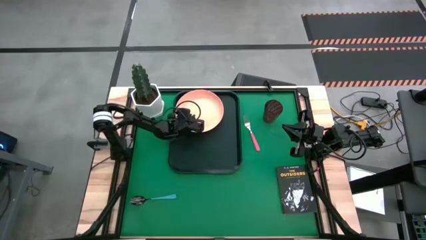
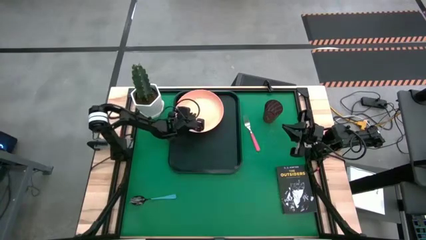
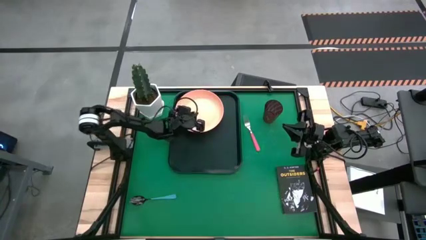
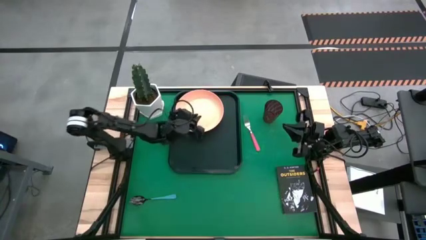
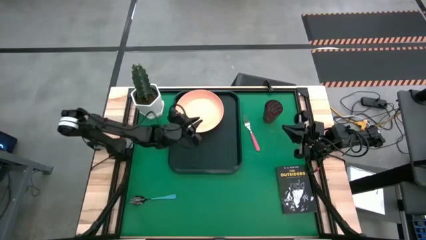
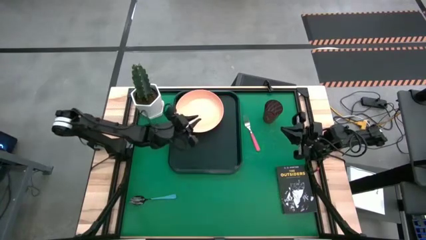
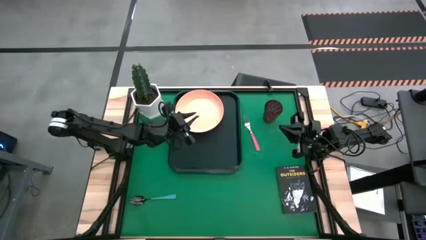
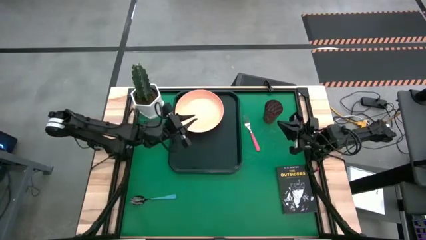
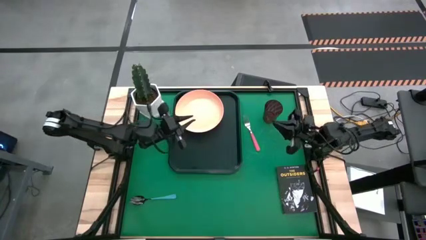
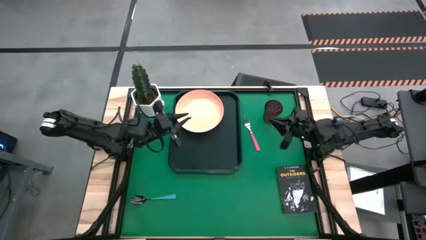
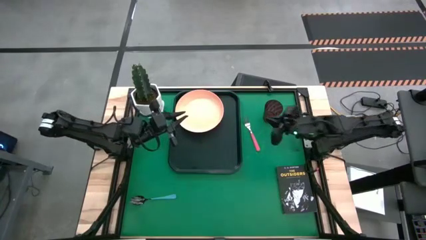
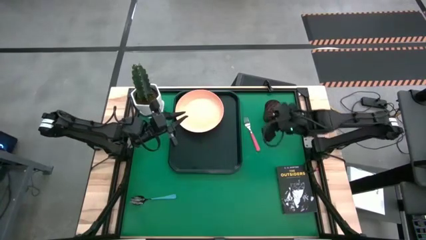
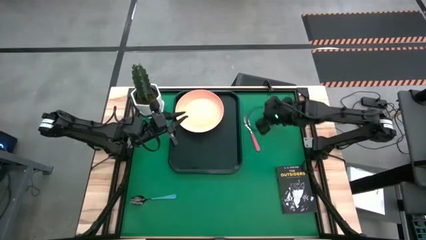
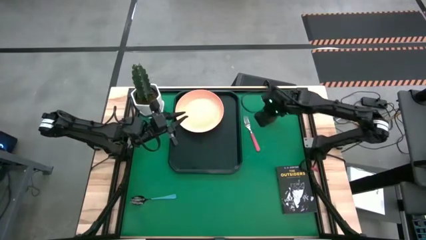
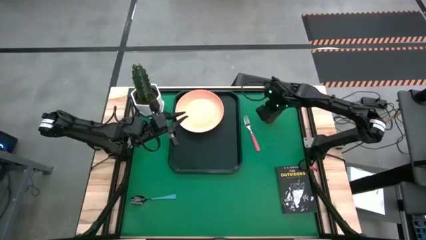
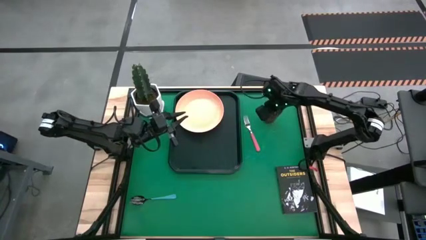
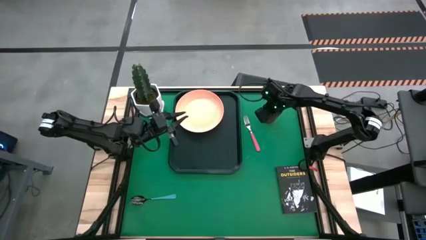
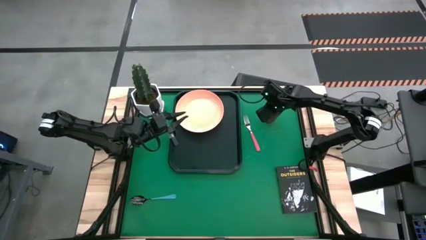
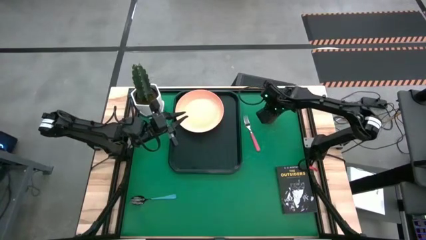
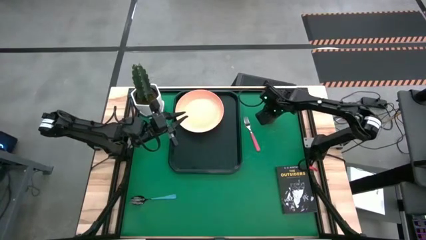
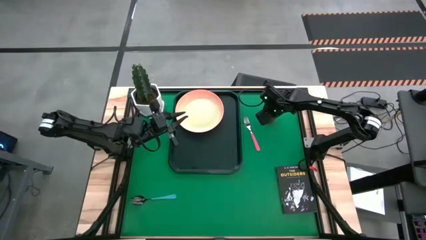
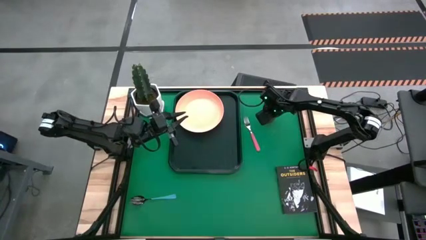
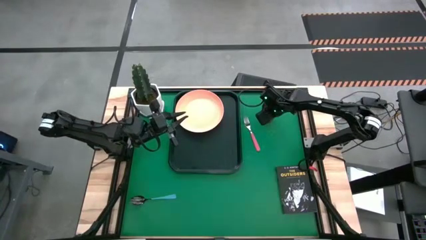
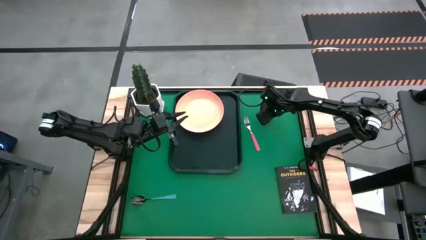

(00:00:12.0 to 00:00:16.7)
Task: Pick and place plate/cup/fork/spoon on tray
Put the red cup to the bottom right of the light orange plate on the black serving tray

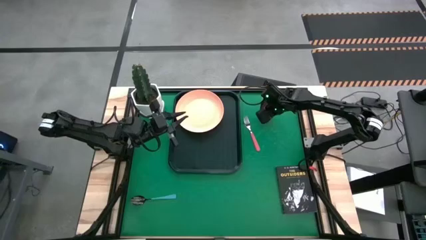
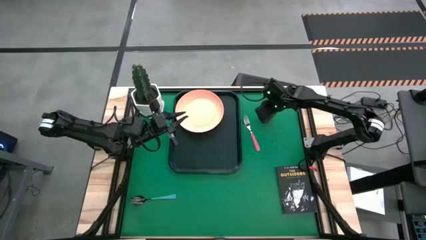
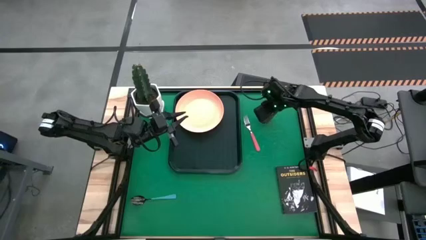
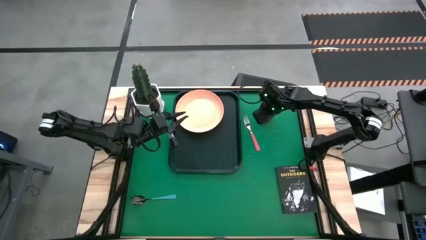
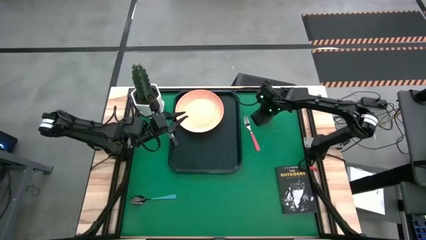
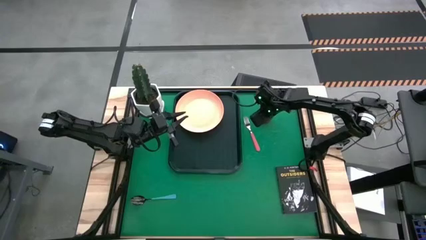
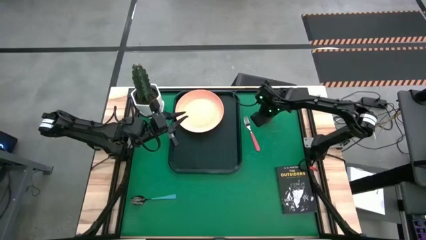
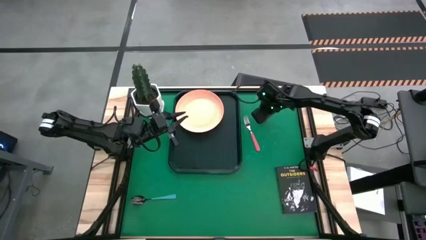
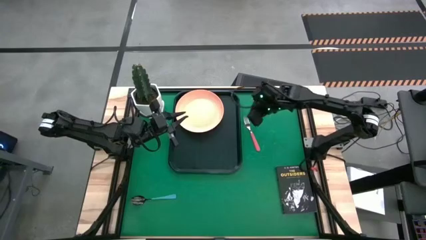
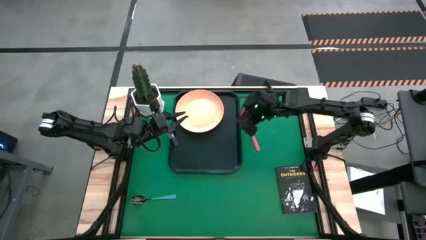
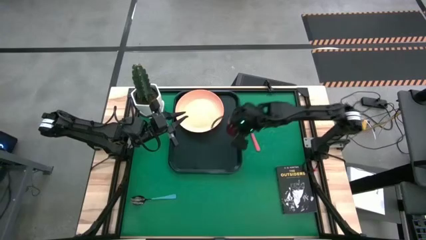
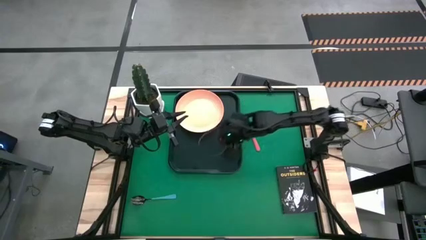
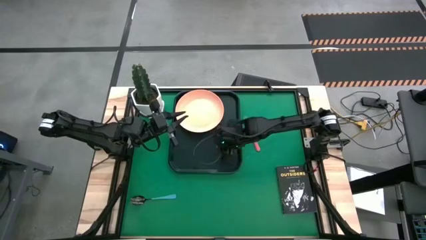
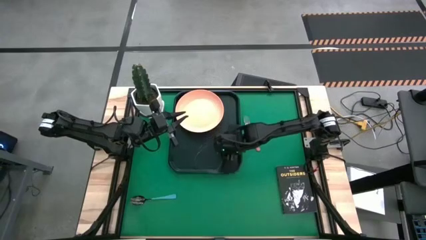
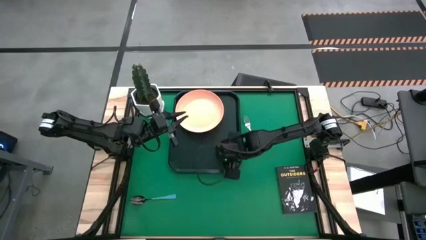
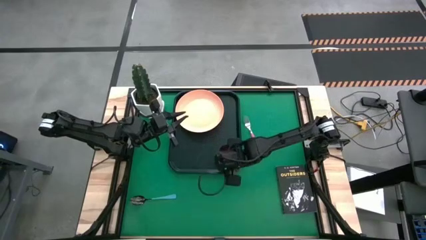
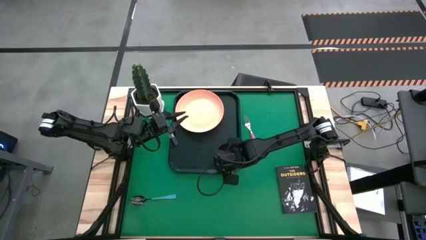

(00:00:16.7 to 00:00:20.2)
Put the red cup to the bottom right of the light orange plate on the black serving tray

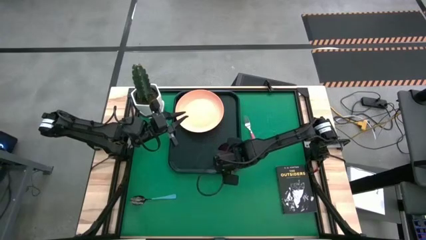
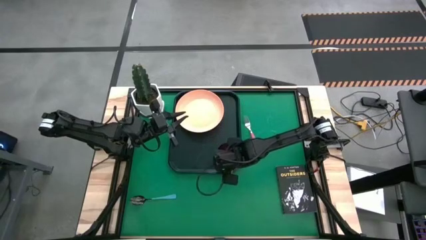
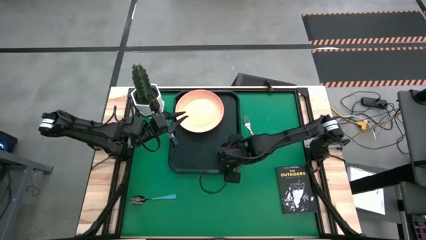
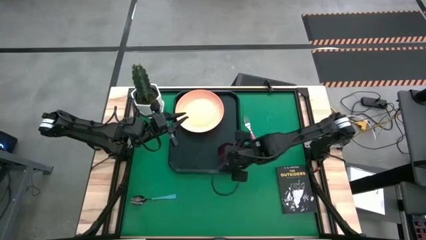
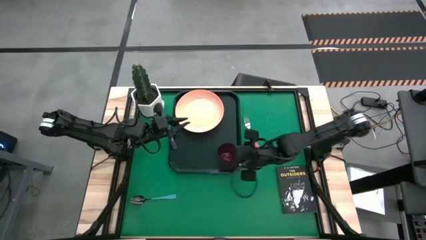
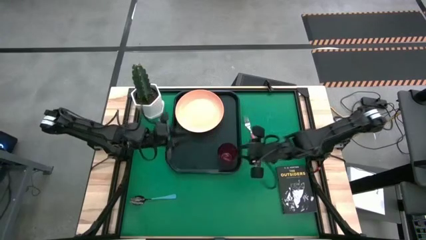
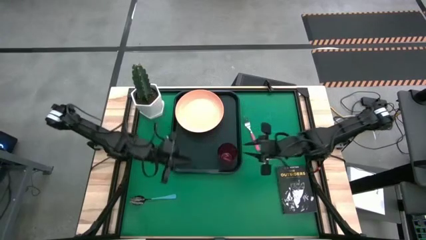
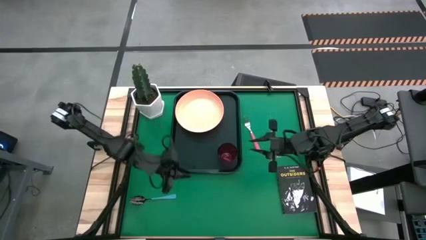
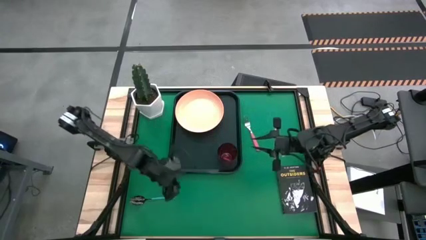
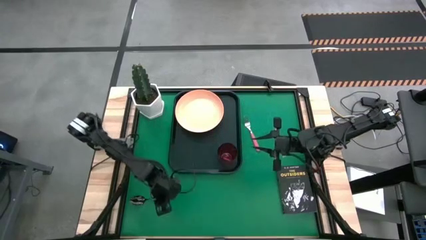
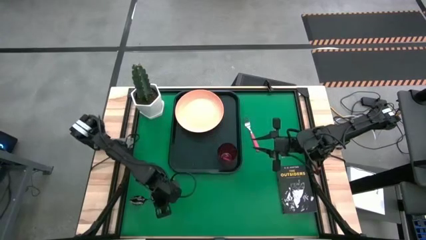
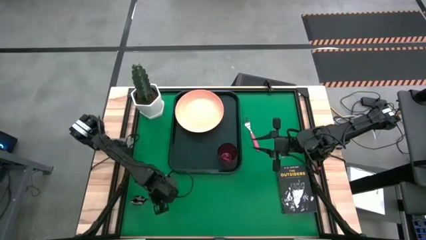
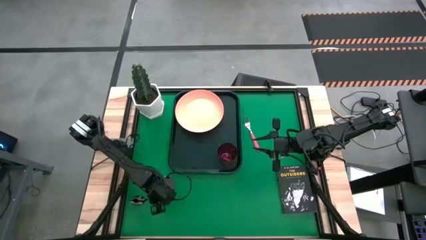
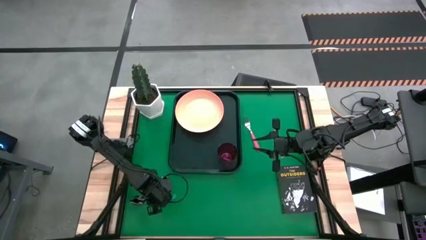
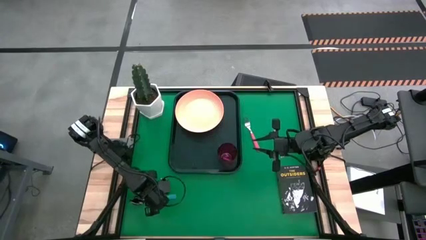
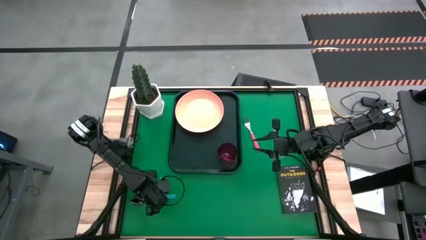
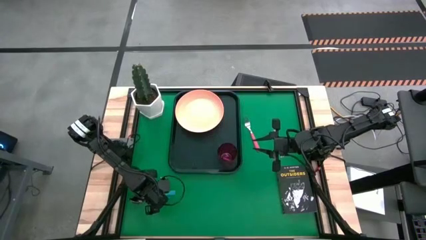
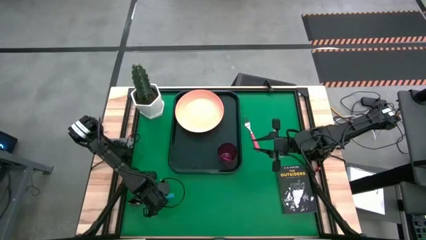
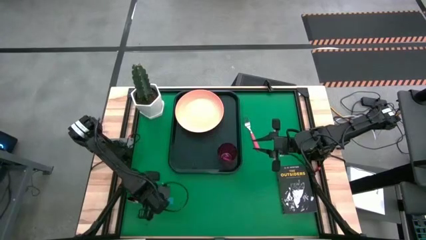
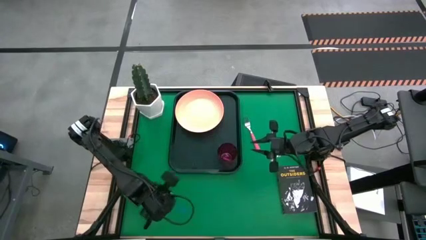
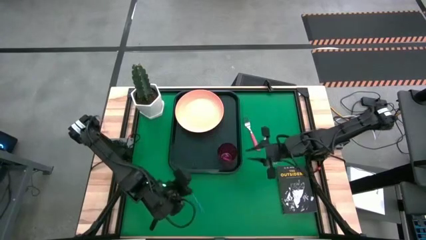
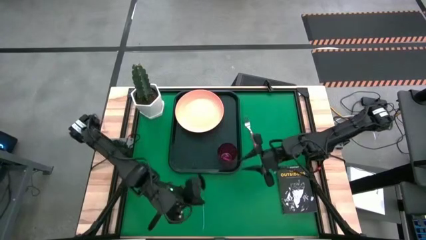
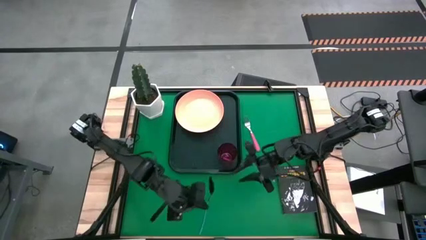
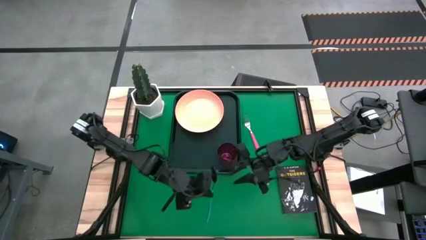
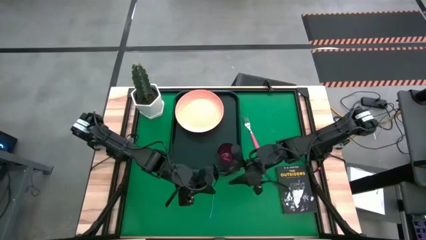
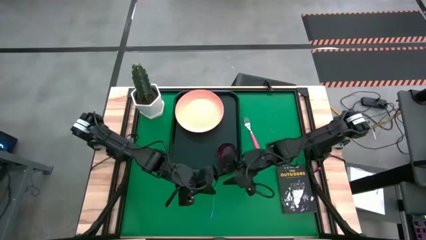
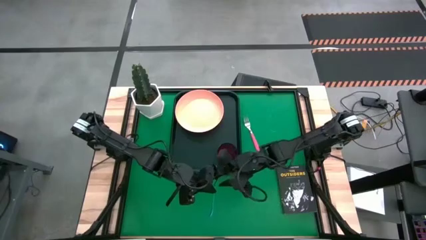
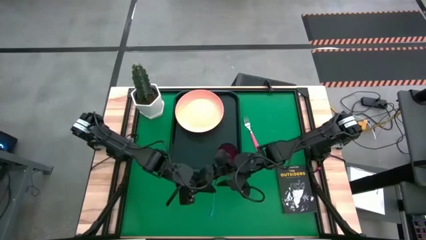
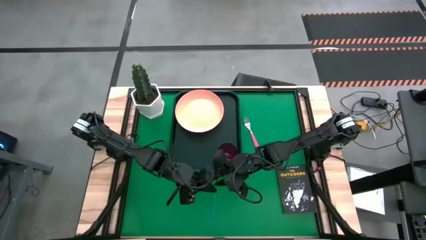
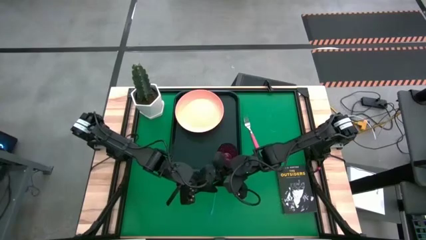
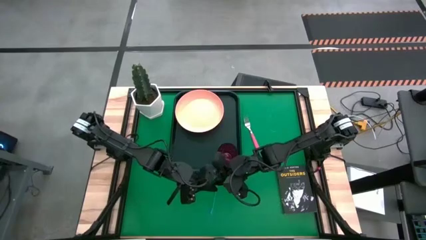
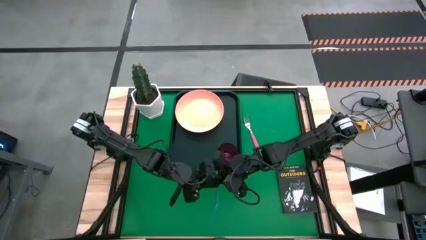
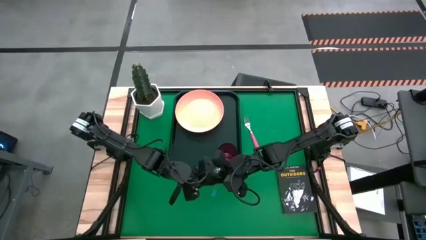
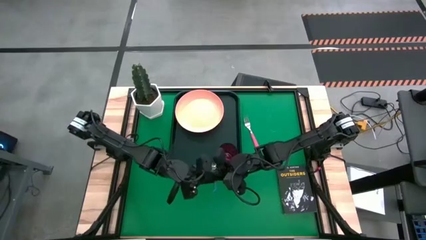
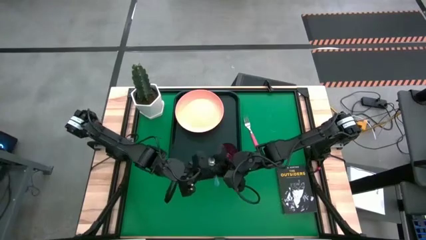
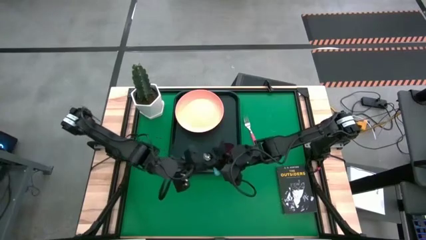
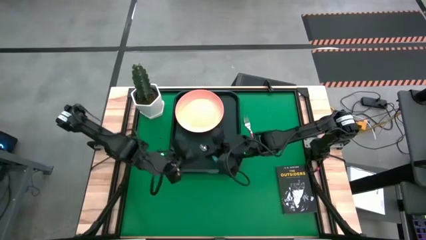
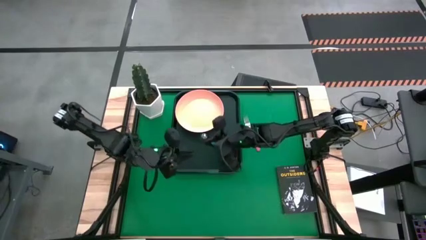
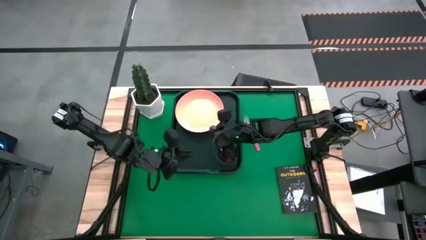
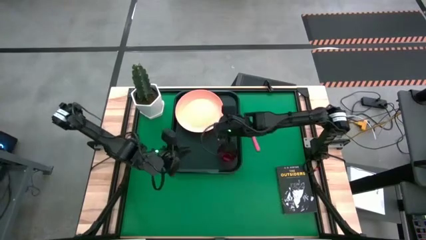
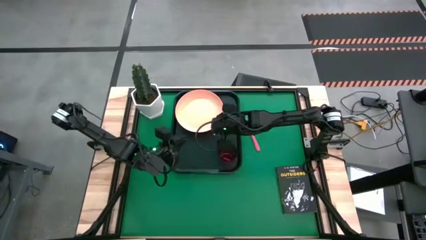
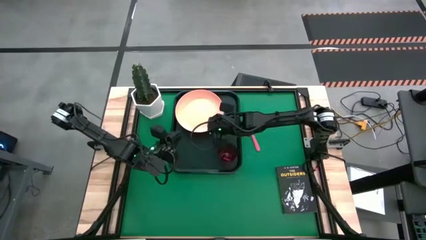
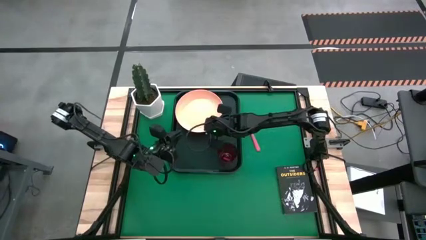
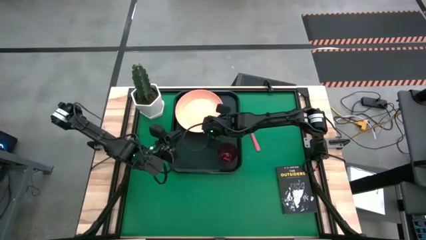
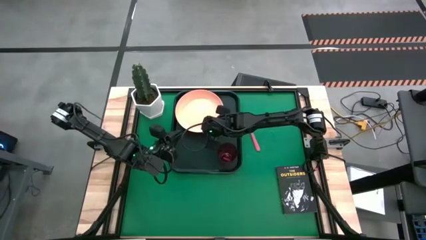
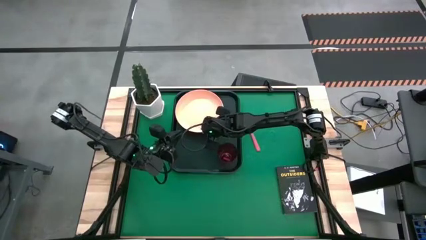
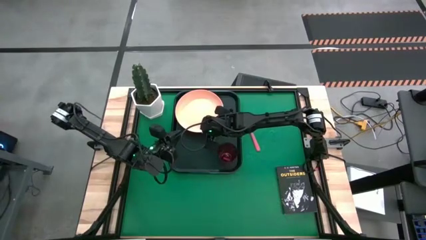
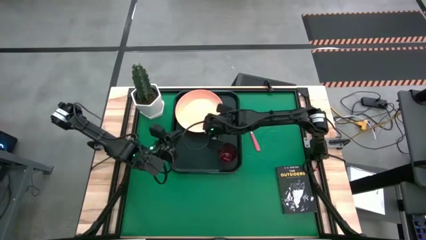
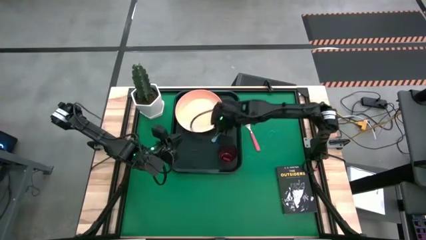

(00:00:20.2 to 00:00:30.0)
Put the blue spoon to the bottom of the light orange plate on the black serving tray
